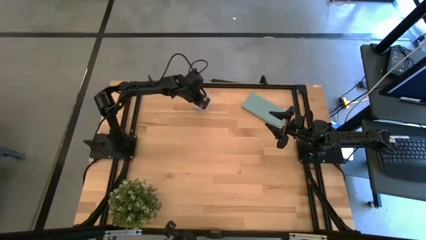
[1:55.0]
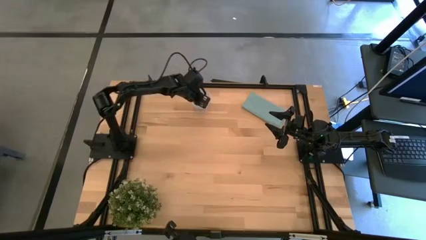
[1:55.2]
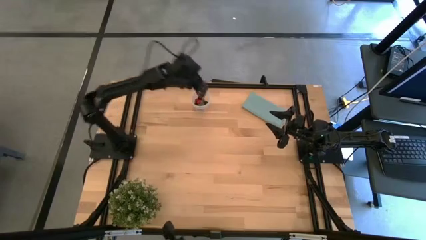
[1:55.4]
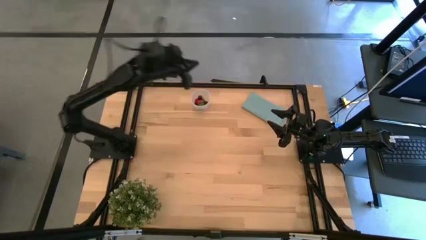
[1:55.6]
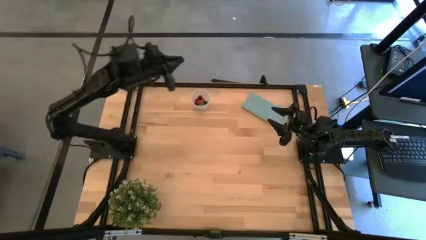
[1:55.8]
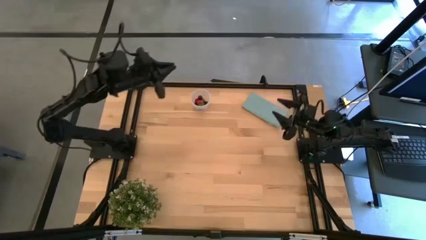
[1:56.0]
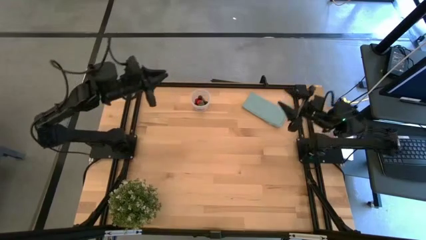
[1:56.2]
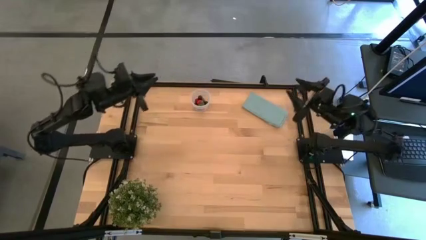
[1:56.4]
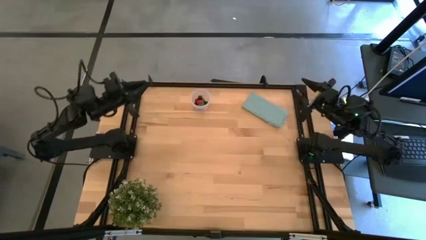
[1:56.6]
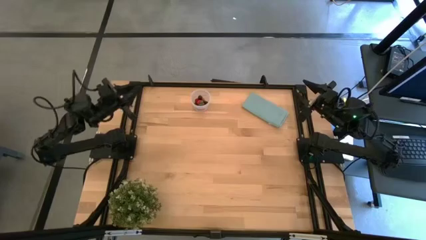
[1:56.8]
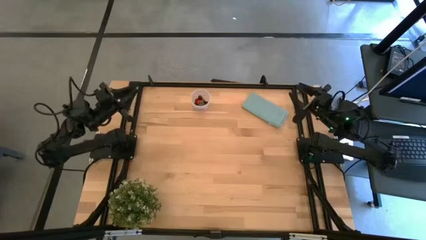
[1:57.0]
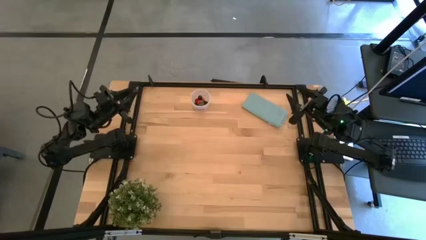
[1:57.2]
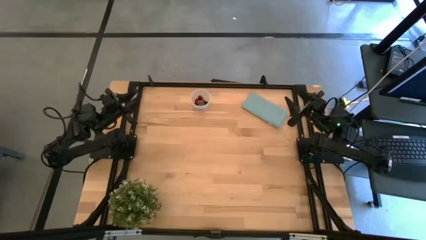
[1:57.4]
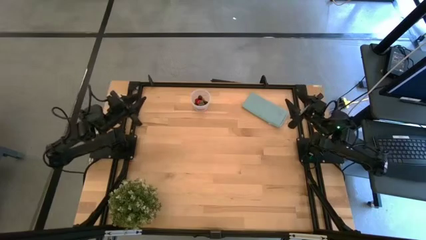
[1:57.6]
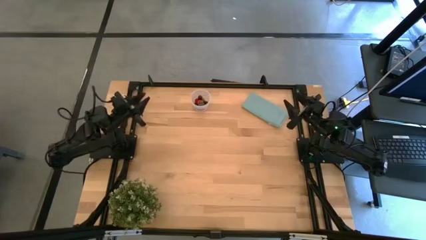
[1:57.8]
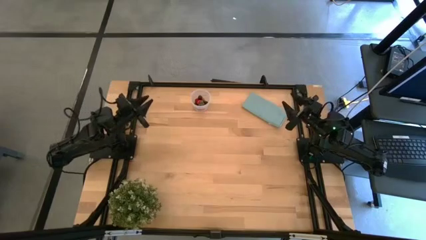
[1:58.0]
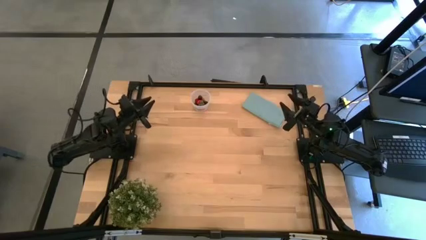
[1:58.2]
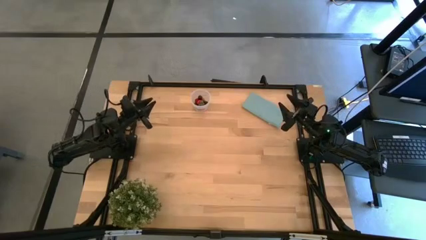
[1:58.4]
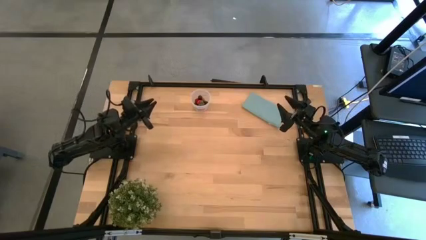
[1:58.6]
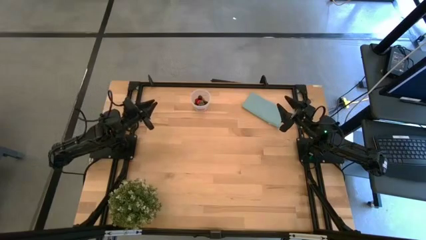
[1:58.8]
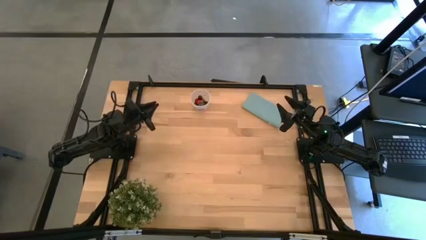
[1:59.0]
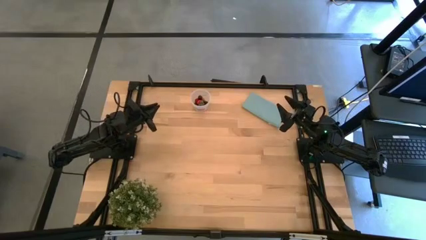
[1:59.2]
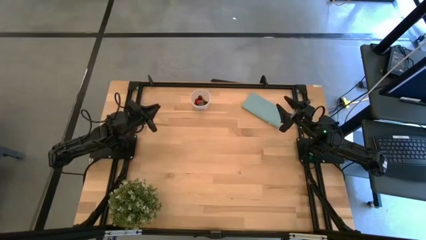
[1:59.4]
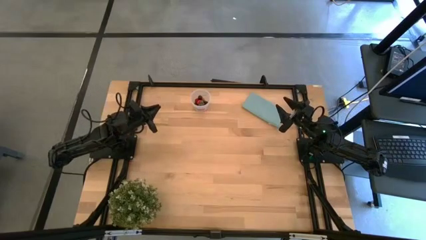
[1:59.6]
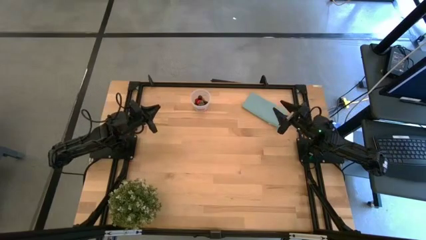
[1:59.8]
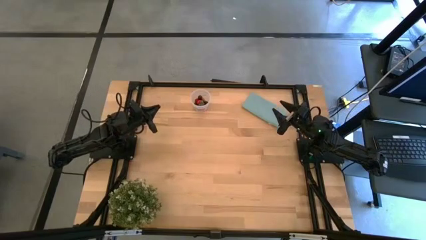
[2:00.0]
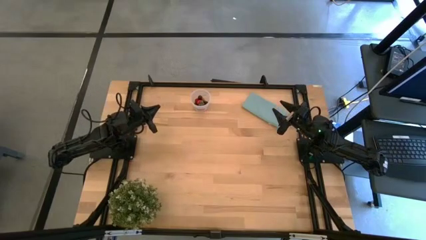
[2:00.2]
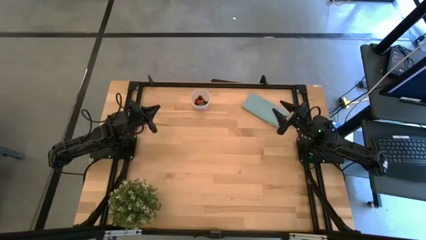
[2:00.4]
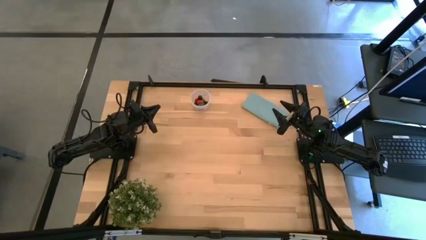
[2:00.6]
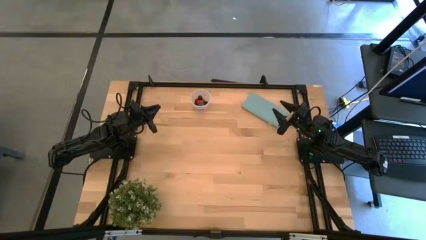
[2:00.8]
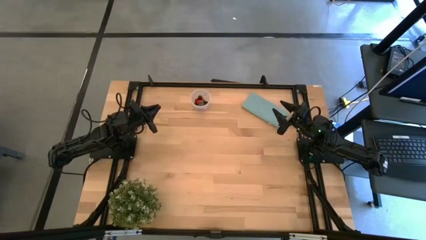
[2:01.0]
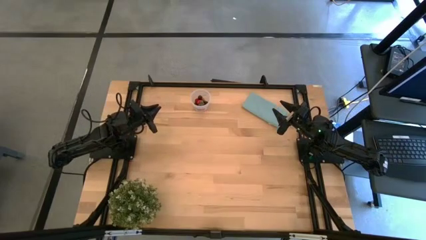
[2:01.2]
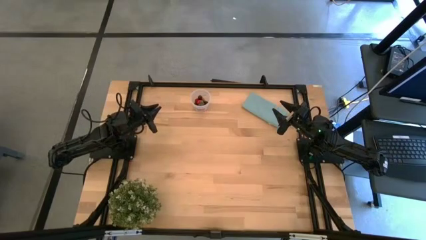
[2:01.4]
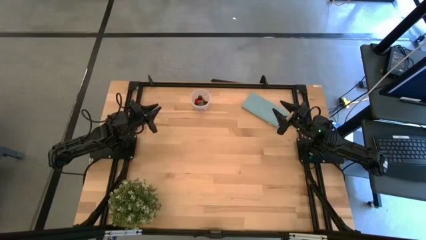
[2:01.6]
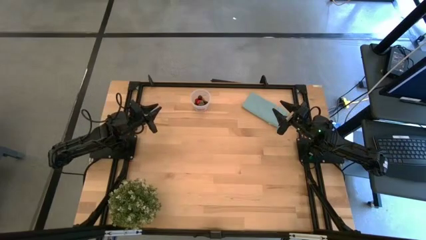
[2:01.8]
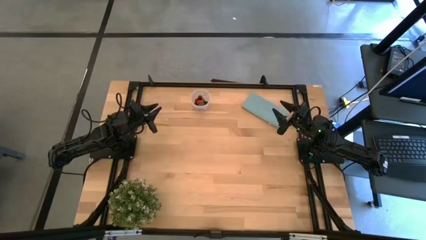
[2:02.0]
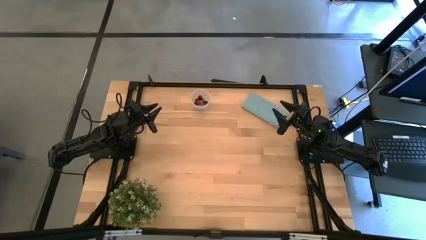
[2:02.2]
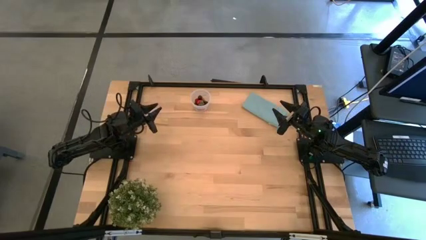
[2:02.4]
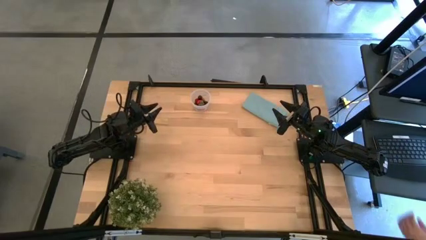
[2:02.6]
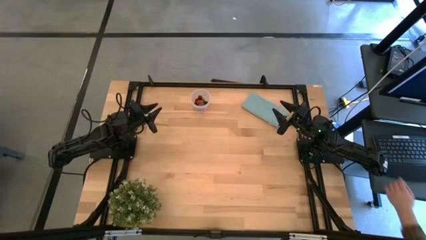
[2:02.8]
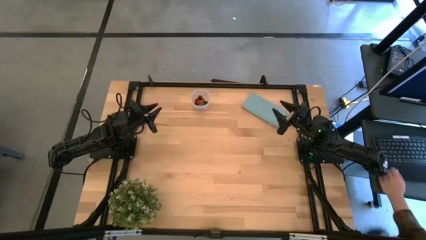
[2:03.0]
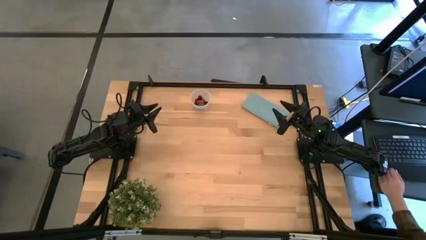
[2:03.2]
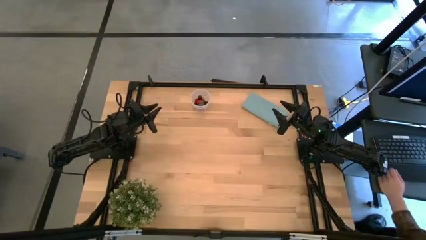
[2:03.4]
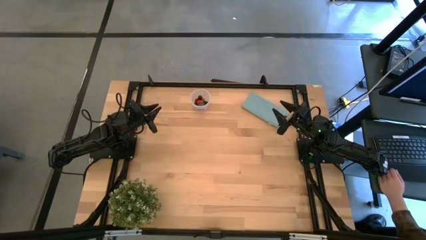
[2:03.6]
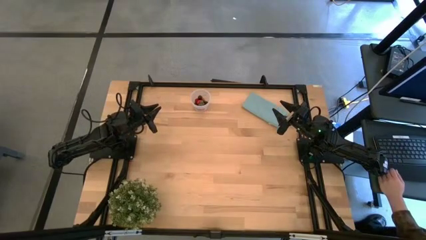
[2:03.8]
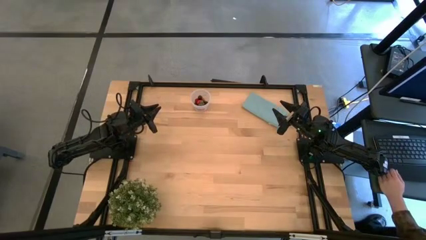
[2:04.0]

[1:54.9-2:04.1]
Task: Pick and placing Produce into tupperware
Return to Home Position

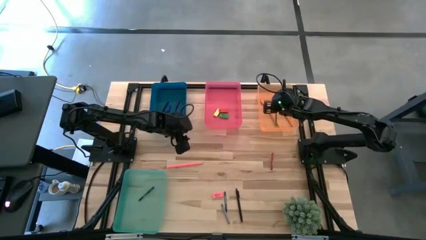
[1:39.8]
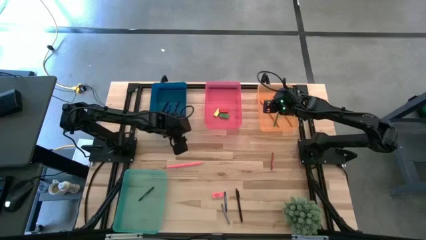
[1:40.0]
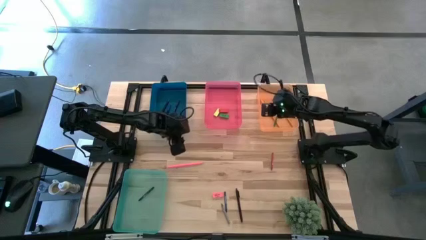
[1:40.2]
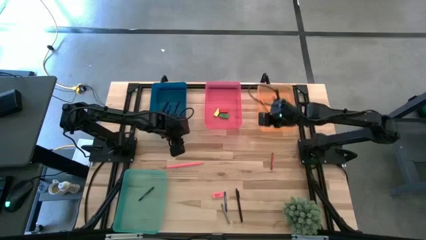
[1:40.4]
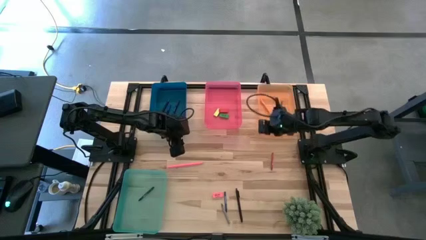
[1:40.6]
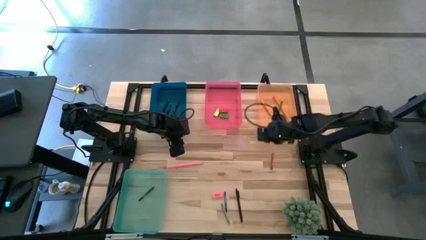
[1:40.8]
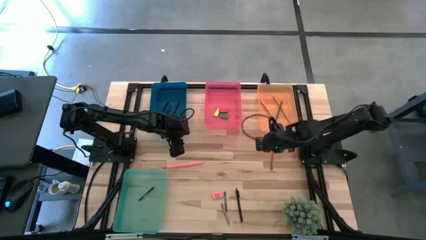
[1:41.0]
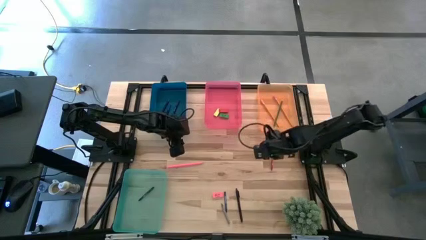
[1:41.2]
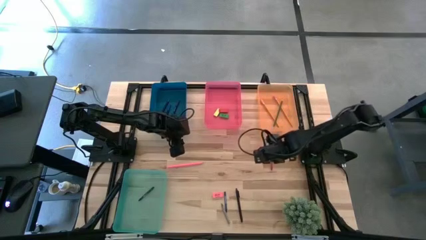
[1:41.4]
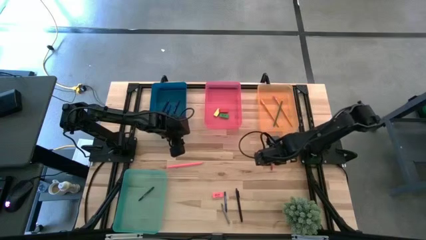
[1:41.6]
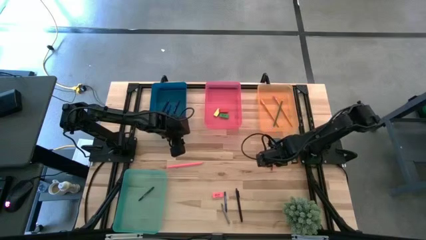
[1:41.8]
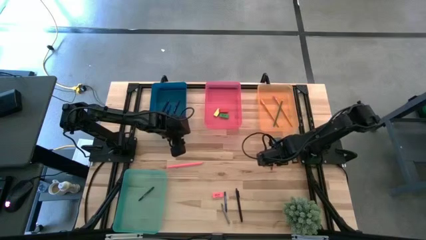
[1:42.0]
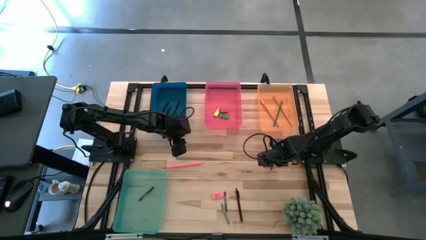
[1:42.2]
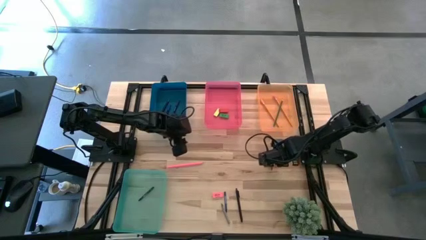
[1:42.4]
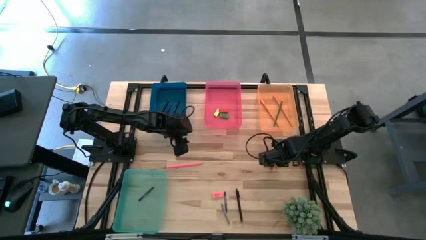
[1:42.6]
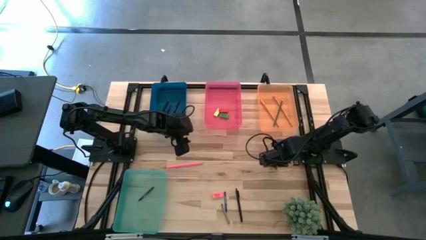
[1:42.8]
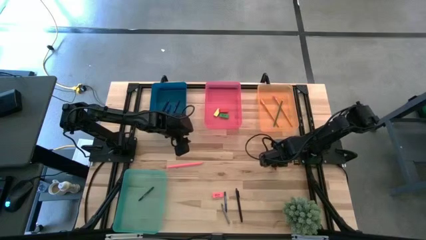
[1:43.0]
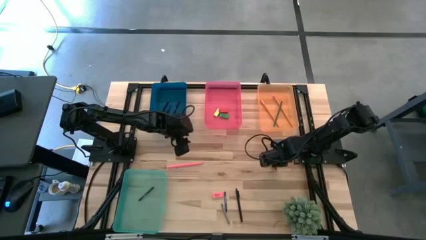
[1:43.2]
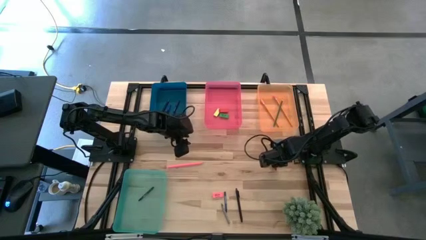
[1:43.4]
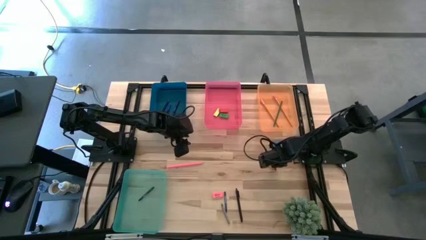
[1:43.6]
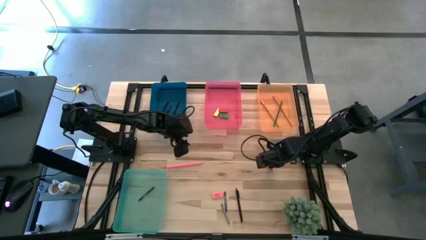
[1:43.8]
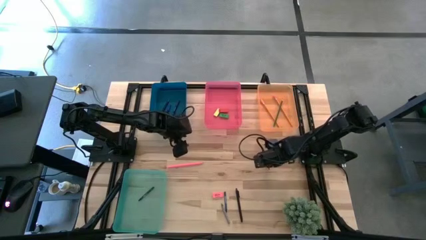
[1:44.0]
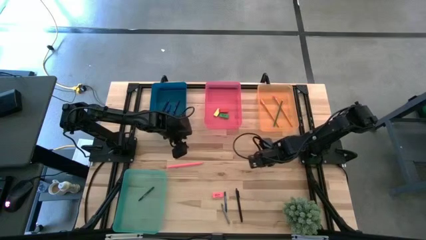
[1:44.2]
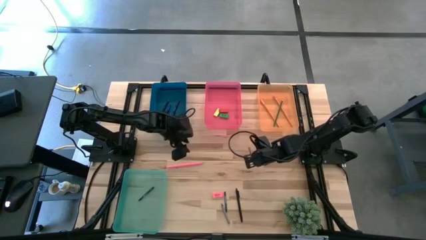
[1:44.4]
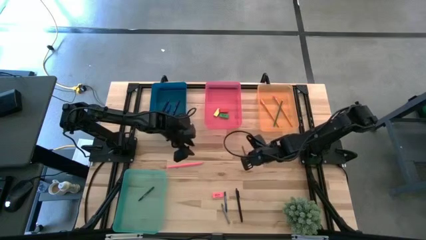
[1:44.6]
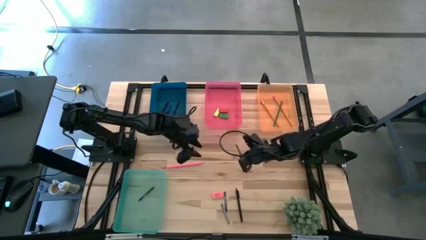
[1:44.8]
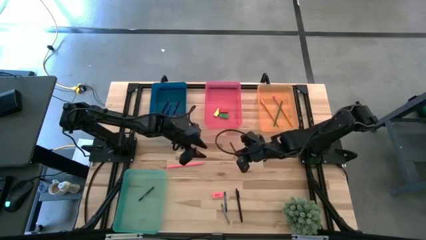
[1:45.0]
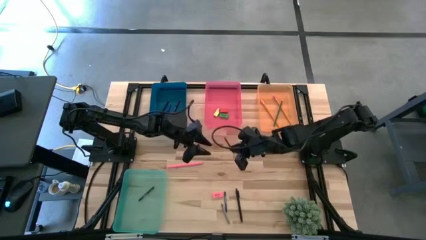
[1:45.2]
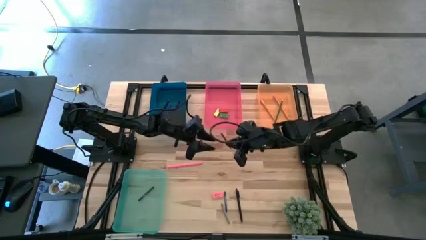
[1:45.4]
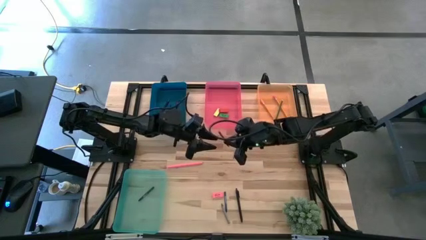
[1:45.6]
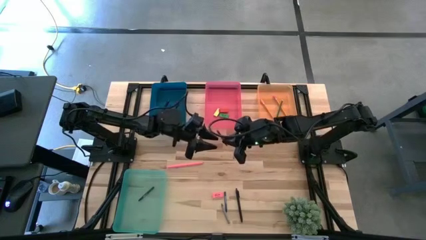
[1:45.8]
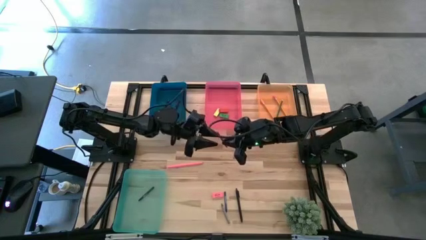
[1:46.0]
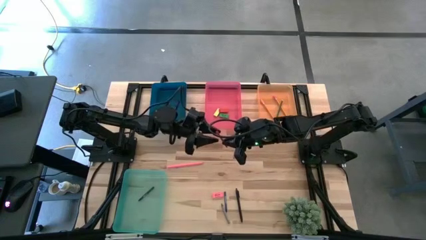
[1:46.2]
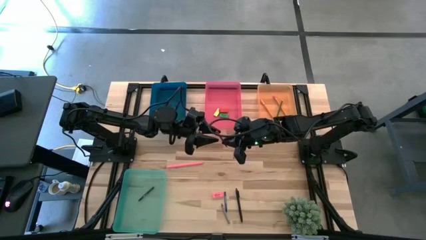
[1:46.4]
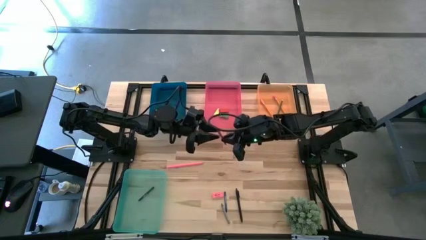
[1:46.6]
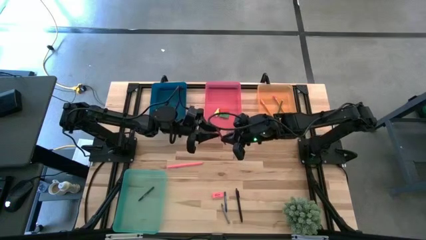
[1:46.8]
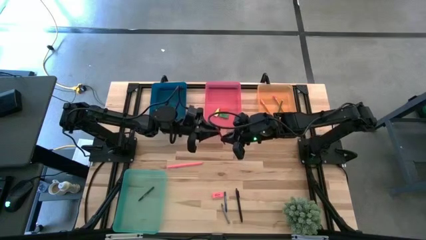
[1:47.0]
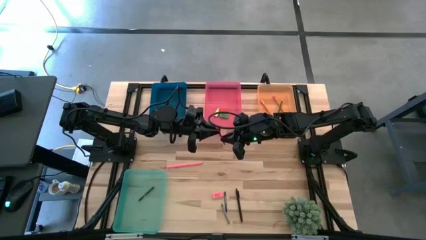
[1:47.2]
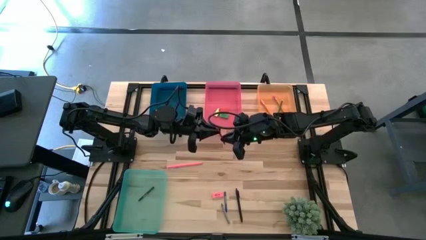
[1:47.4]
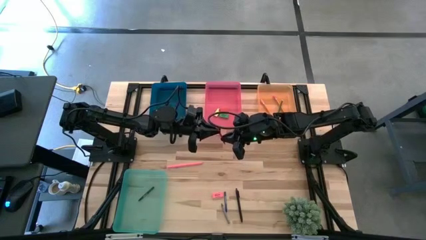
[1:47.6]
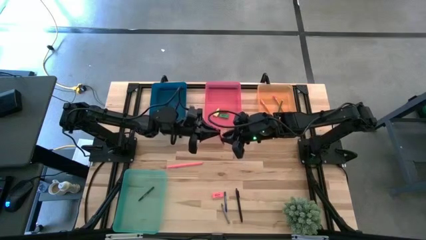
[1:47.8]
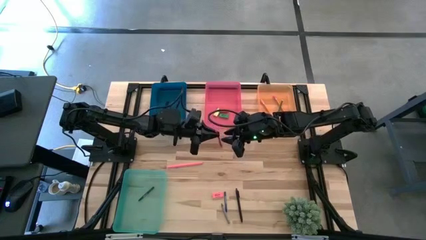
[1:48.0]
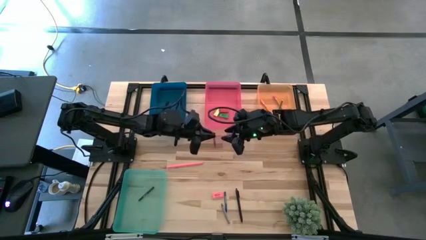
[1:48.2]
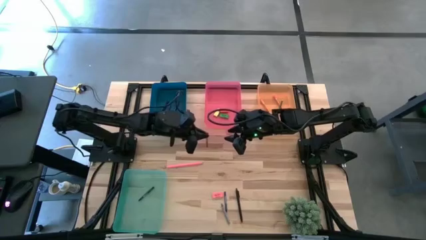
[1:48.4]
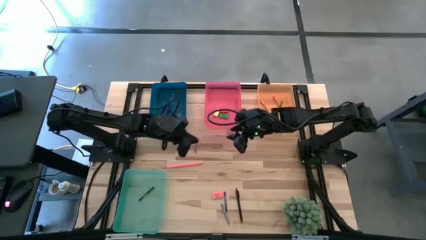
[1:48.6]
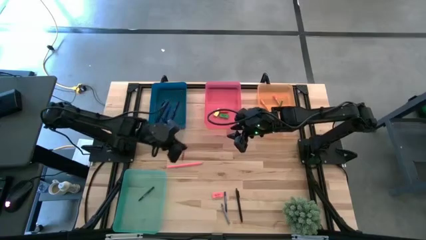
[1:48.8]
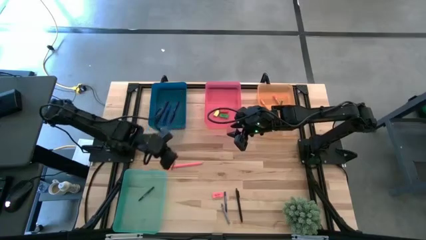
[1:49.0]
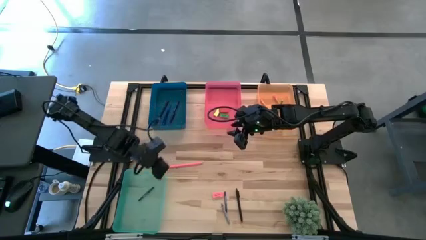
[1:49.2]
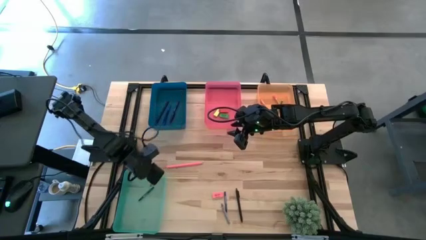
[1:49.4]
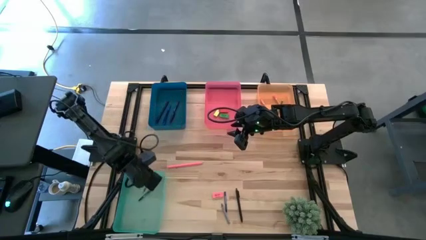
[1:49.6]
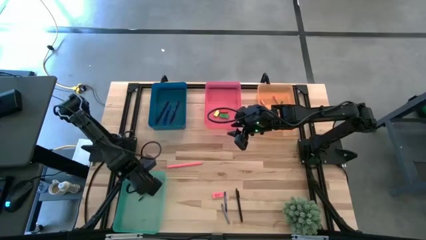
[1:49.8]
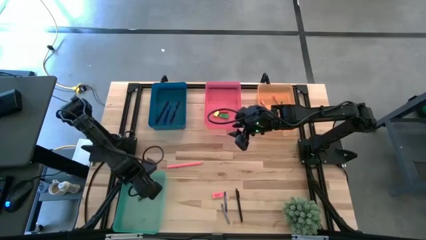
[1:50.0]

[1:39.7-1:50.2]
Task: Sort crayons/erasers/pens/pencils in bins
Put the red crayon into the green bin
